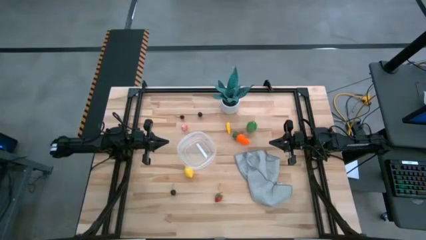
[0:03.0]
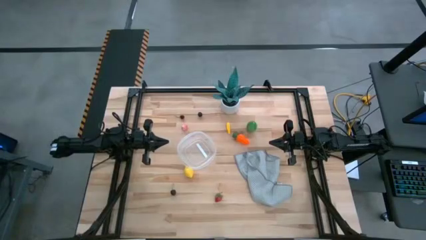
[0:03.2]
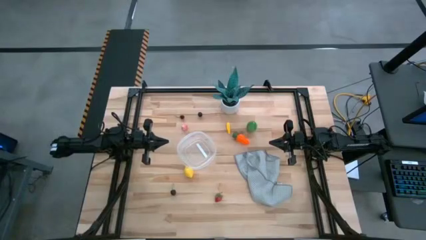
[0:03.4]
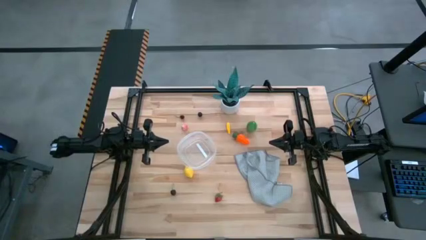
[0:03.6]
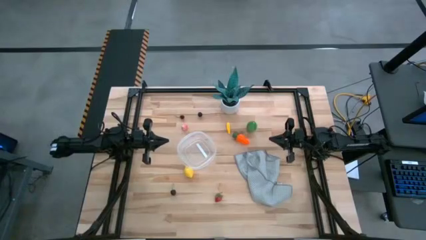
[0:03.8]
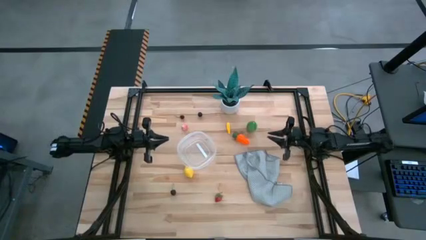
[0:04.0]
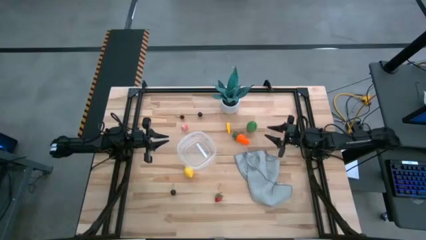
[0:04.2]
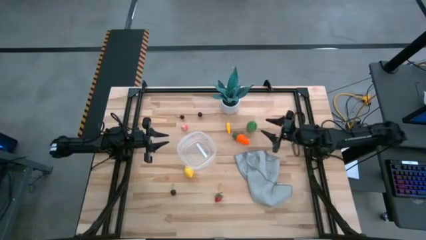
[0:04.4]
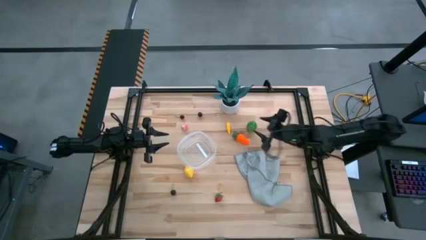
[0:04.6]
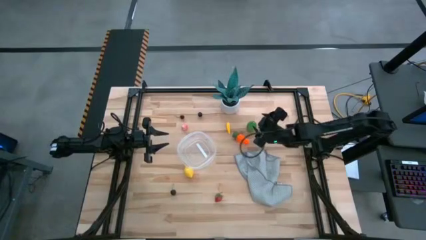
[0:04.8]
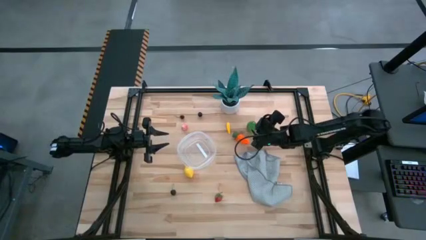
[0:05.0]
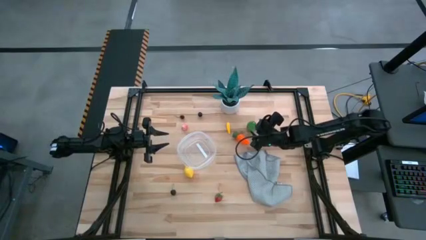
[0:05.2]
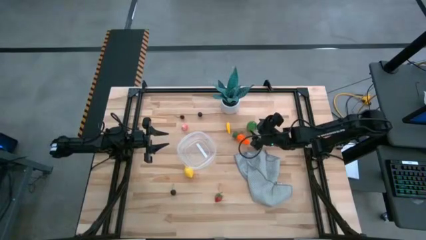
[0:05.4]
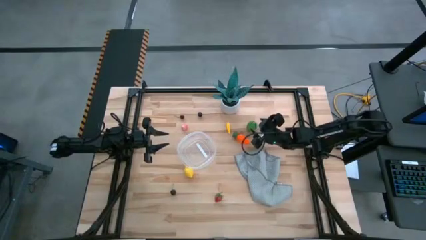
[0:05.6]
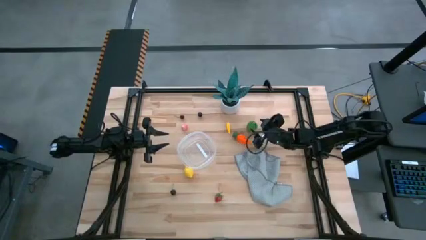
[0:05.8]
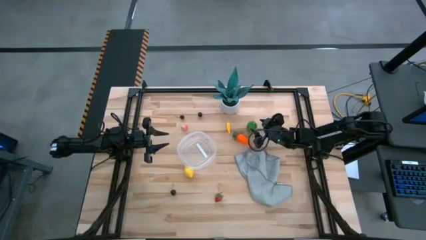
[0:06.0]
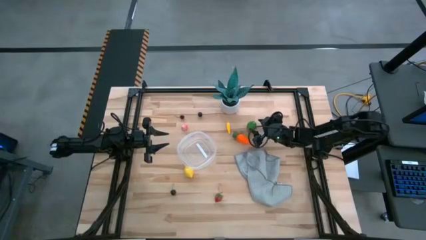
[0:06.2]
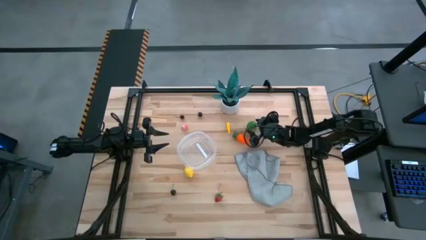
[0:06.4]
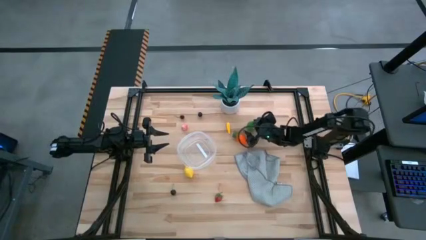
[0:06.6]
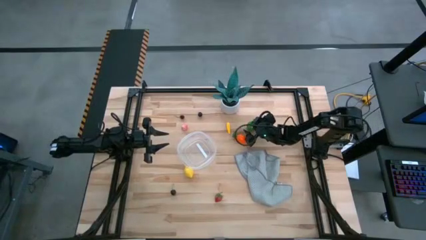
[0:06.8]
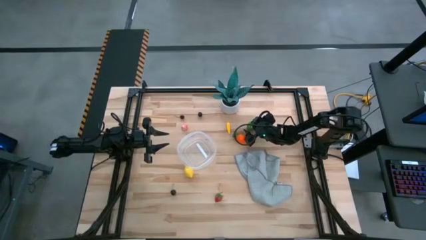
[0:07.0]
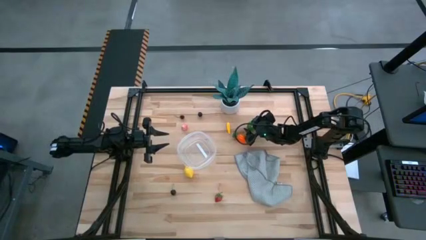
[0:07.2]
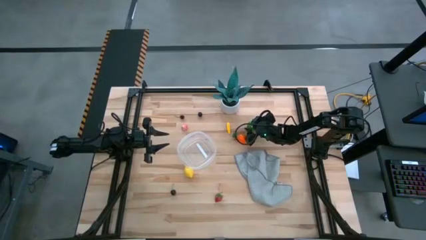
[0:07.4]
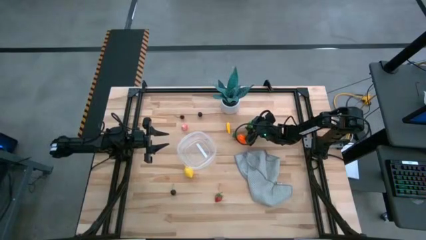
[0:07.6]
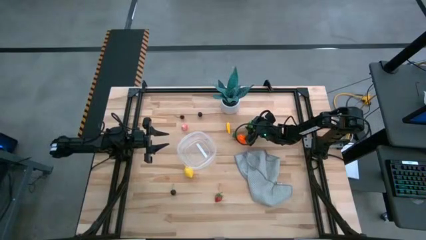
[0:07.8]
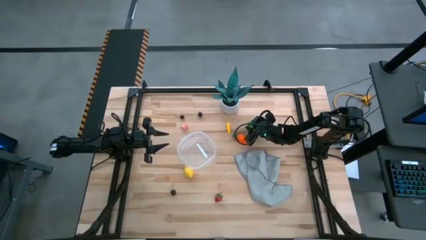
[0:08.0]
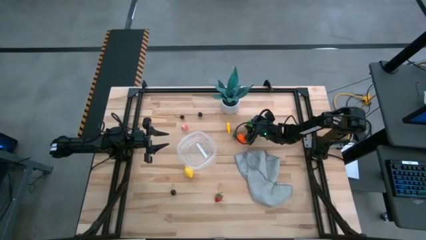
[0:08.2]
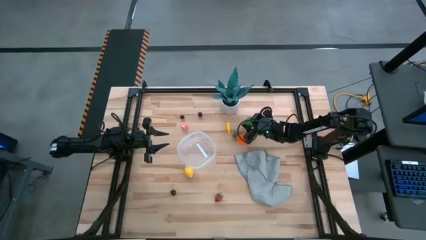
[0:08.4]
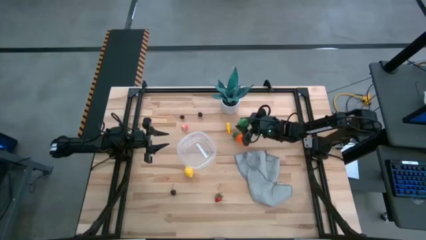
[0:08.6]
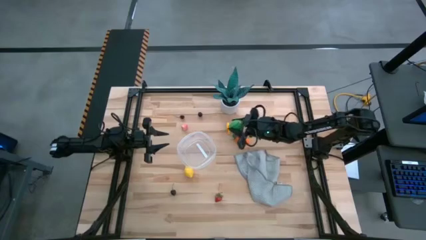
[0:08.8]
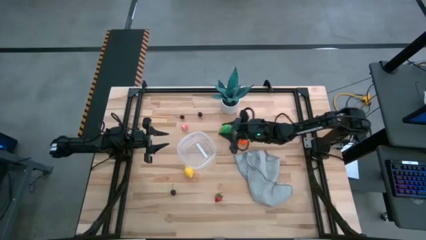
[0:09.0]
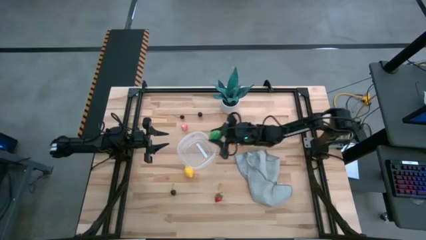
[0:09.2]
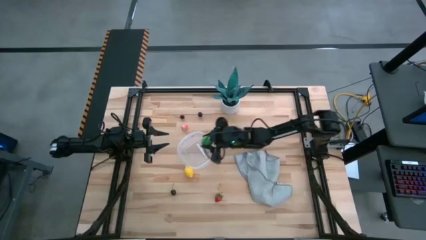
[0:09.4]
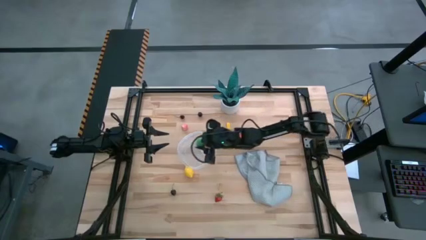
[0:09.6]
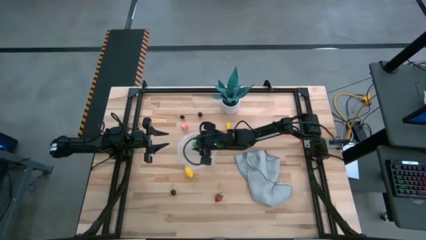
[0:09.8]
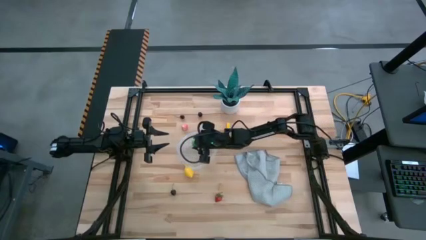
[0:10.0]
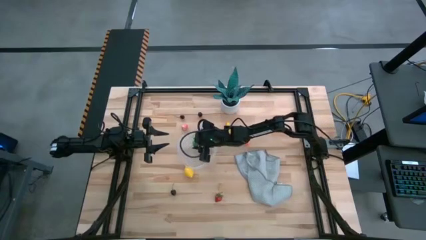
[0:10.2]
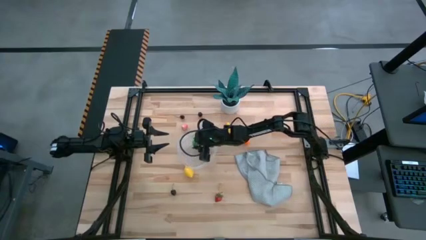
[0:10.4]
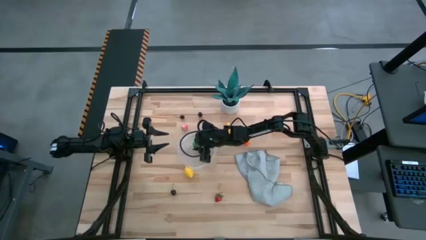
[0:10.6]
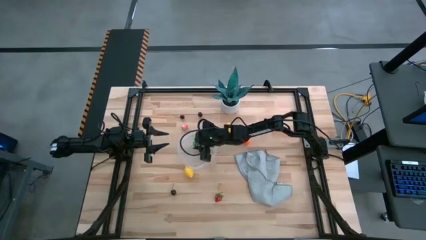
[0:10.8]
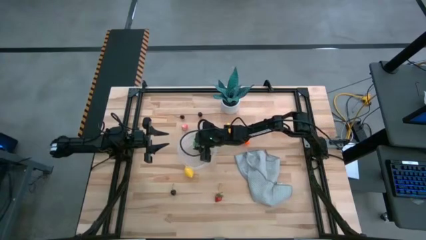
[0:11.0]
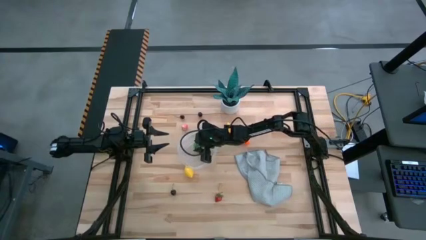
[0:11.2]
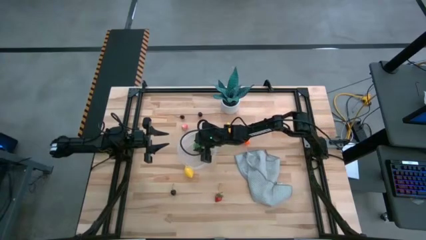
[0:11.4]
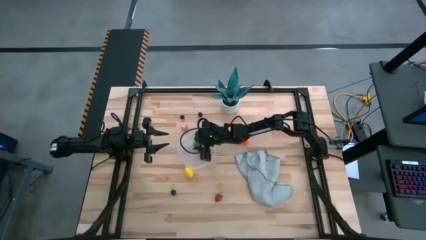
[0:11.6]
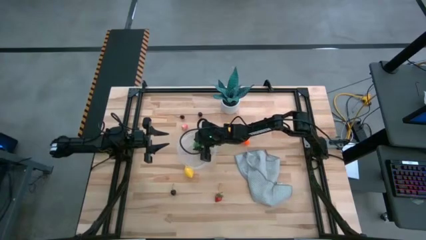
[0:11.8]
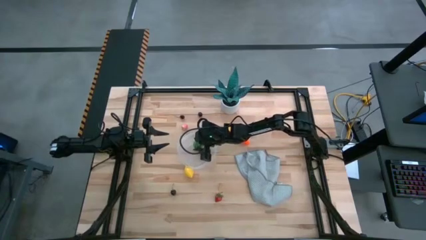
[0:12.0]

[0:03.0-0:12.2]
Task: Pick and placing Produce into tupperware
Put the green corn into the transparent bin

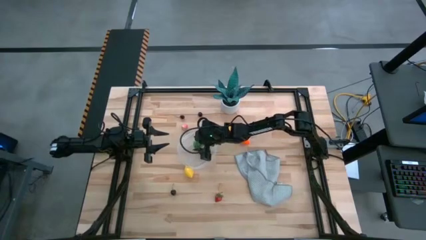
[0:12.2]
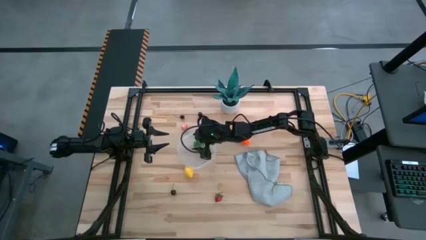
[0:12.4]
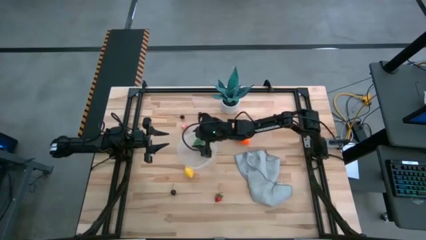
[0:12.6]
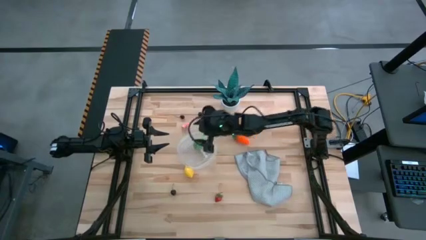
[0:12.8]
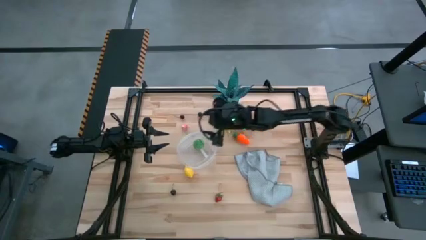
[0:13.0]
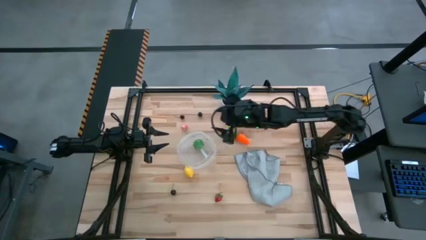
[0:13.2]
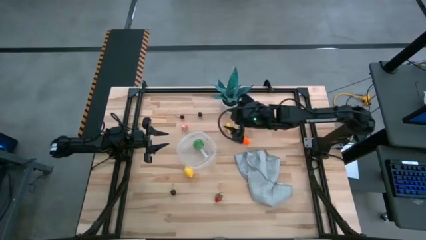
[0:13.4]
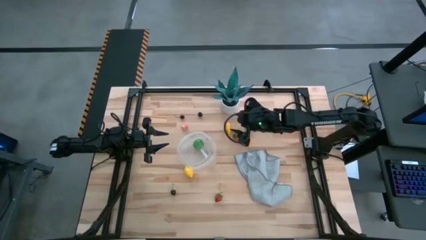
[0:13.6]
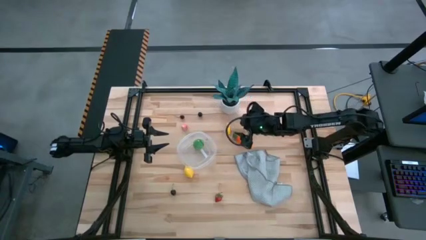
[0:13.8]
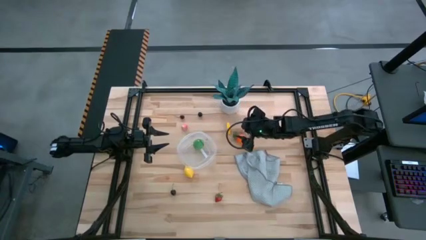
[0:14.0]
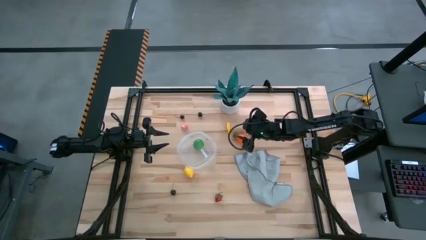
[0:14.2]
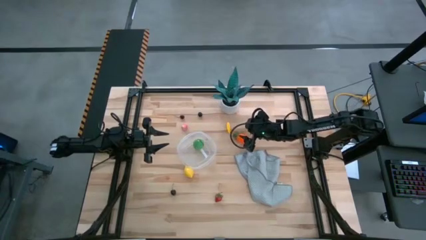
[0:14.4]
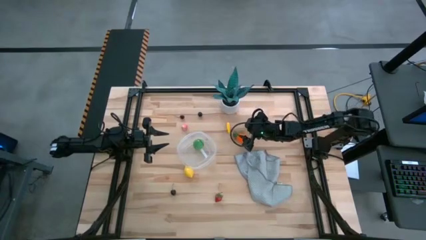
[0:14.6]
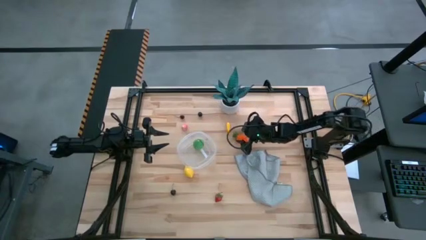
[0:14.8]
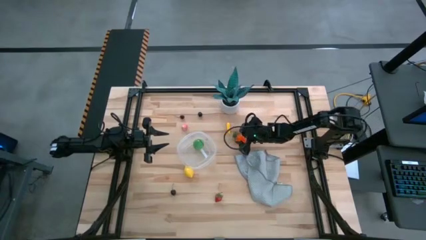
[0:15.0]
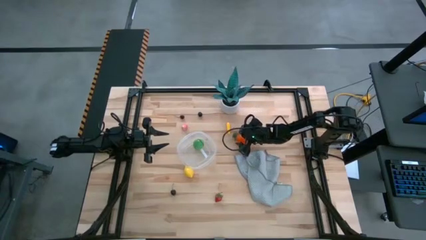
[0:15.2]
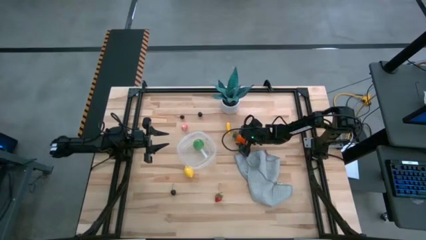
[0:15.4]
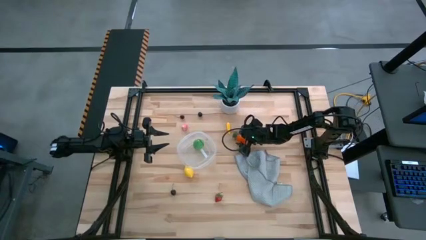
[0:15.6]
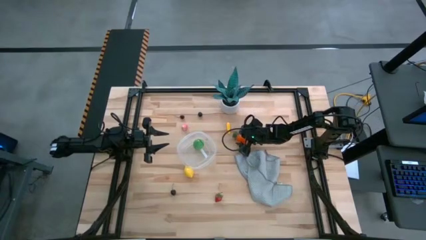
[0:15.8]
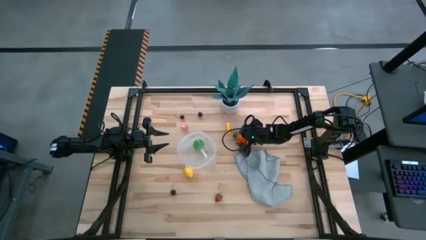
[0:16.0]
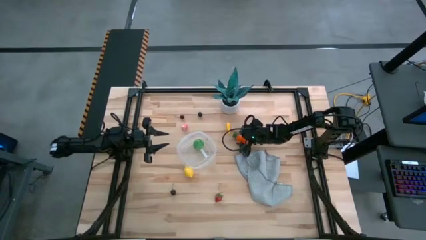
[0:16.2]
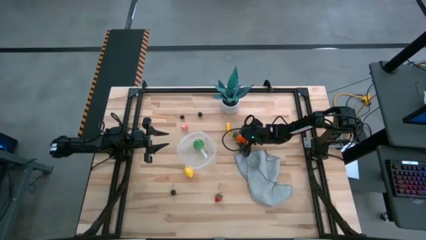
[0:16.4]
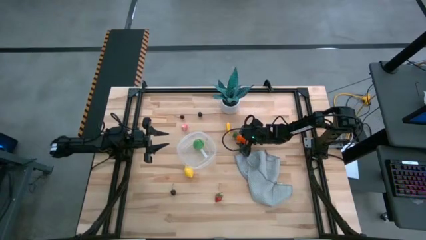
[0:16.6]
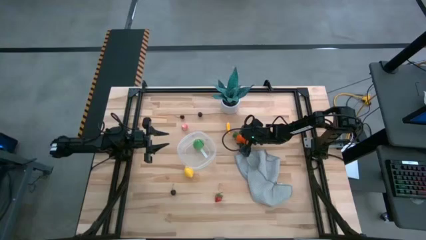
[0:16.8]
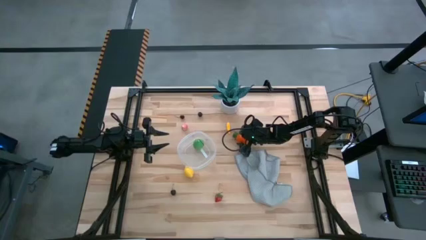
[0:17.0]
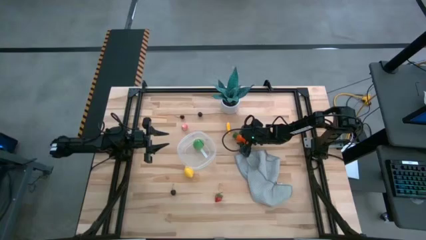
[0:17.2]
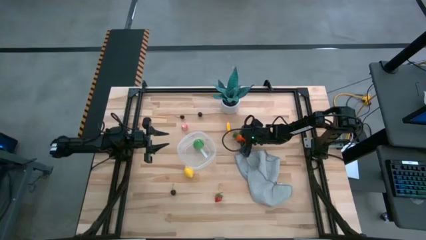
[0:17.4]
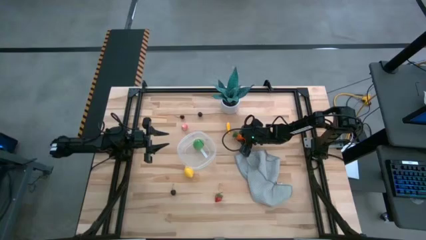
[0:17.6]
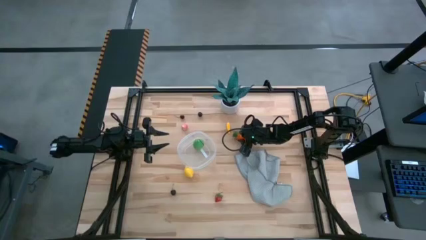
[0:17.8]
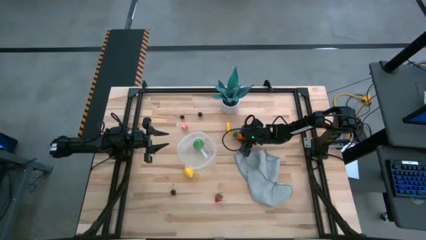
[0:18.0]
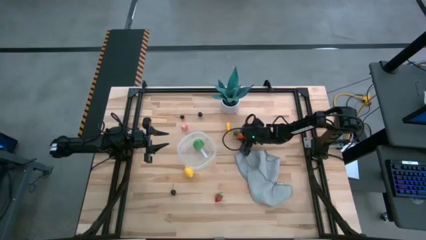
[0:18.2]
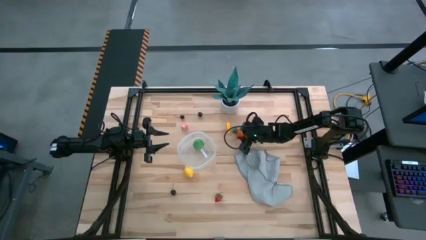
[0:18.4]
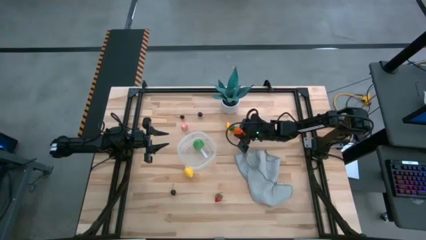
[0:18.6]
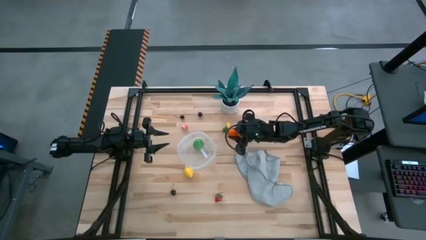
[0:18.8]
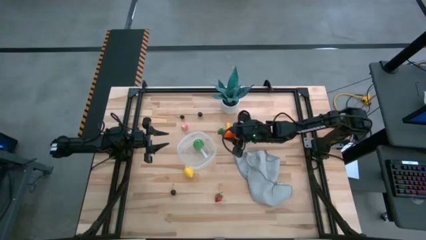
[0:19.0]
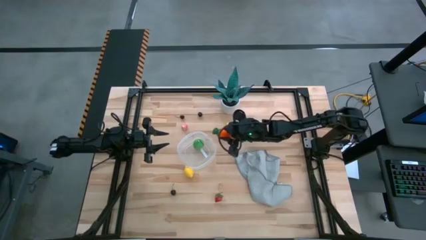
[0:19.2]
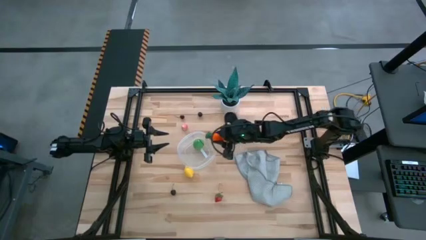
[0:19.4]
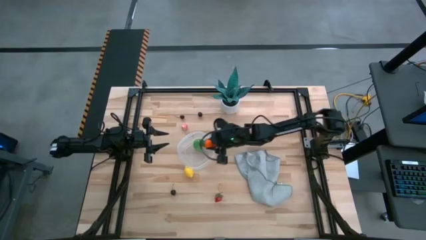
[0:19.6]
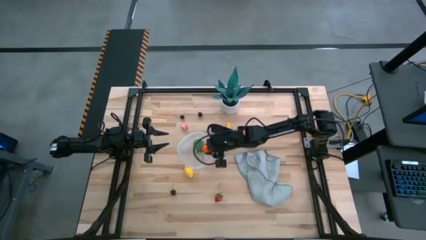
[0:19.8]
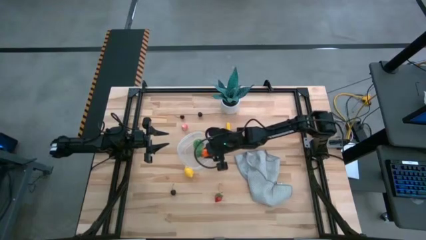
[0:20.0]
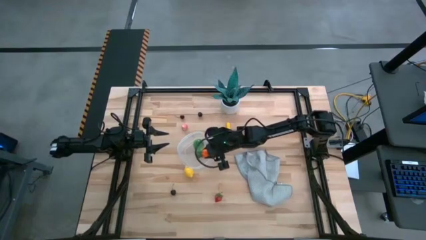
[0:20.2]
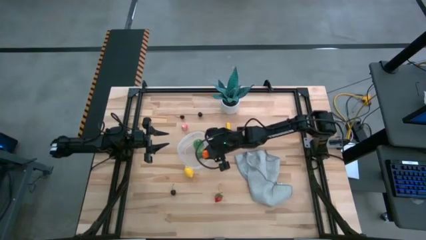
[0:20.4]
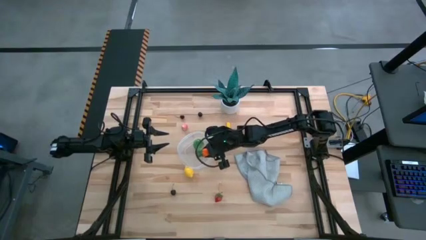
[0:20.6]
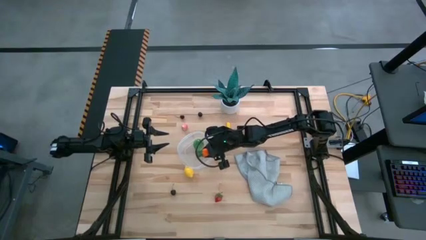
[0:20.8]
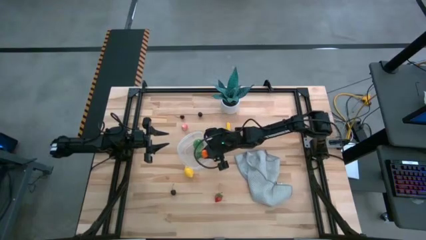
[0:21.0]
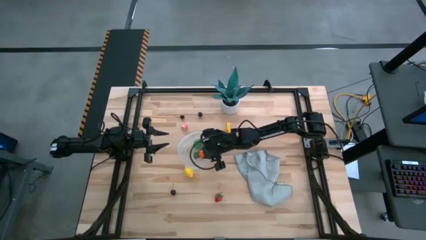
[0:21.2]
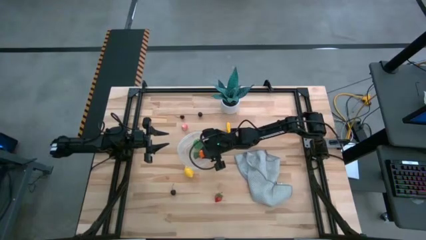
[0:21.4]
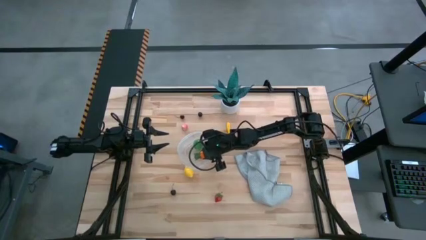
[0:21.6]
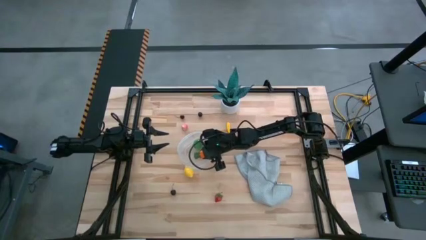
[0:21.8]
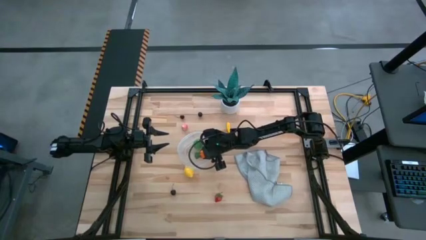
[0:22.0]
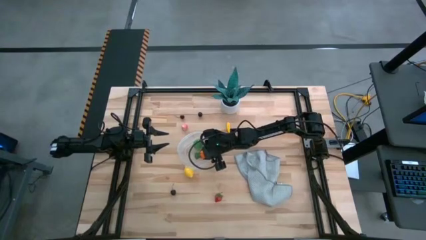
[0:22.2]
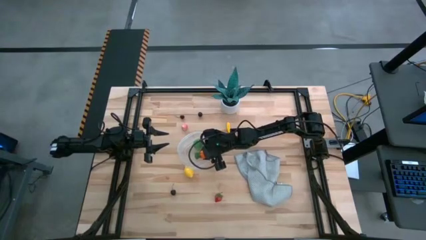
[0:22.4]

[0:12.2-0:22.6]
Put the orange carrot into the transparent bin
